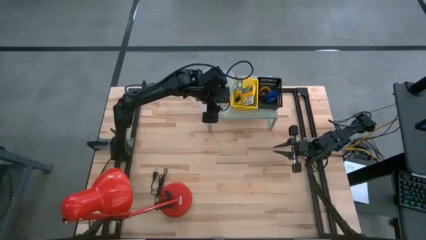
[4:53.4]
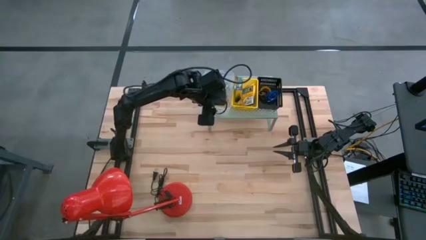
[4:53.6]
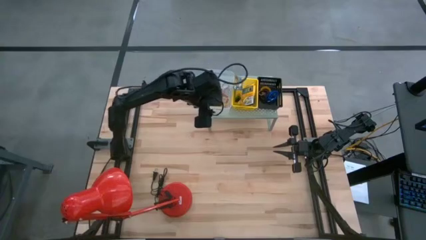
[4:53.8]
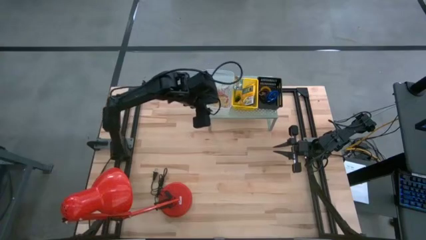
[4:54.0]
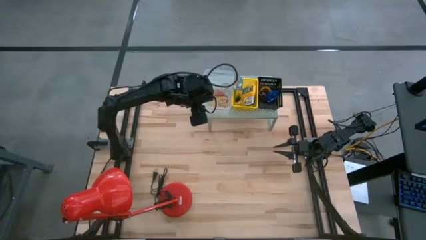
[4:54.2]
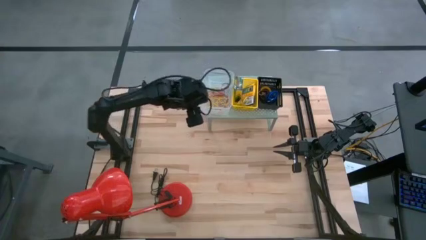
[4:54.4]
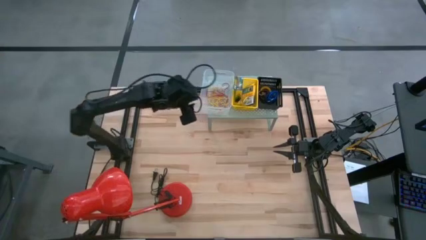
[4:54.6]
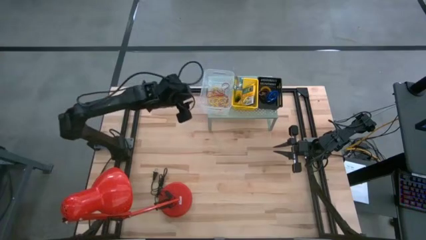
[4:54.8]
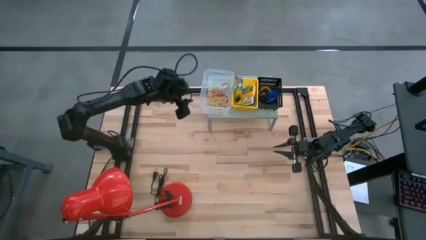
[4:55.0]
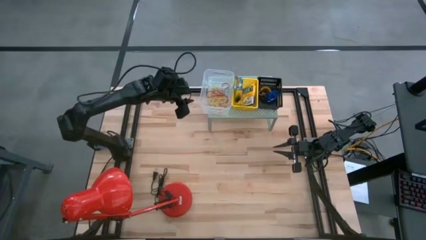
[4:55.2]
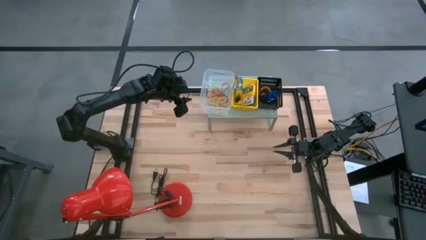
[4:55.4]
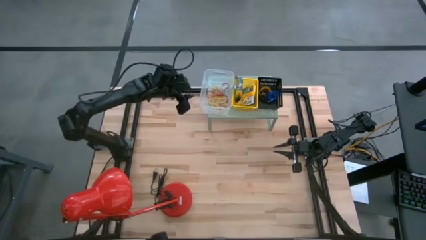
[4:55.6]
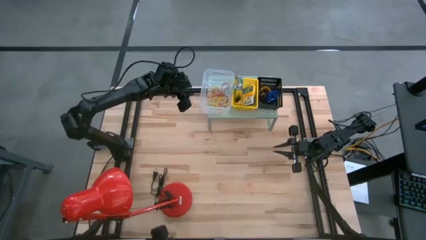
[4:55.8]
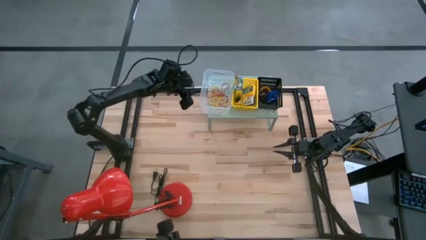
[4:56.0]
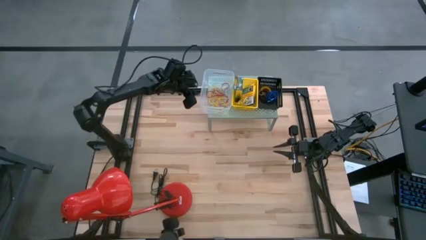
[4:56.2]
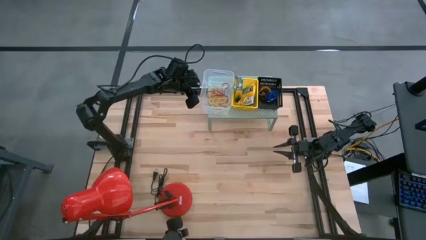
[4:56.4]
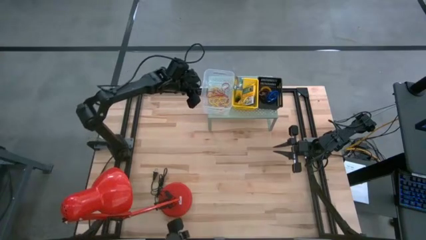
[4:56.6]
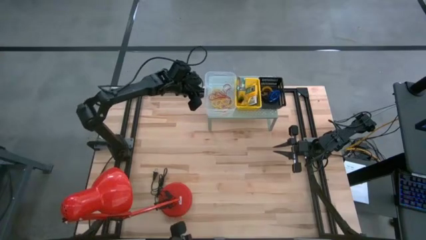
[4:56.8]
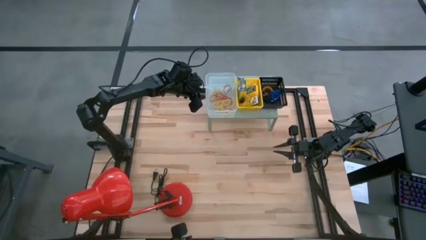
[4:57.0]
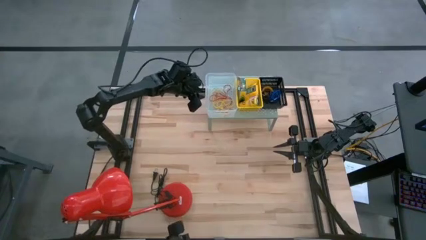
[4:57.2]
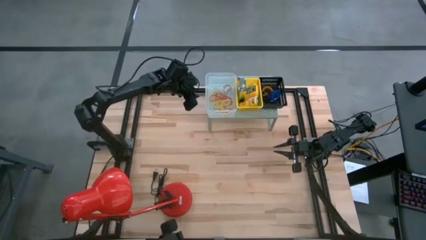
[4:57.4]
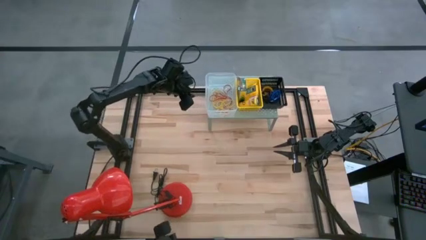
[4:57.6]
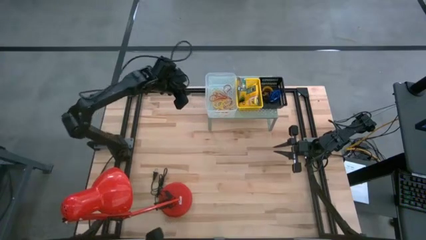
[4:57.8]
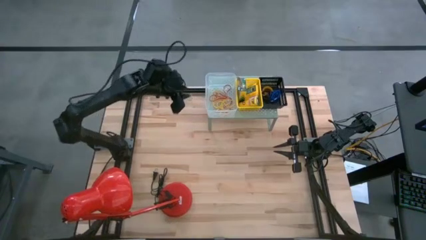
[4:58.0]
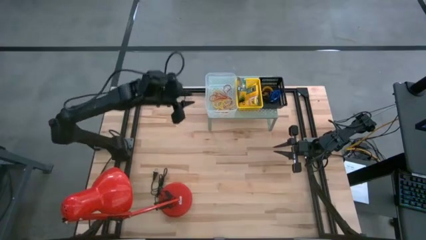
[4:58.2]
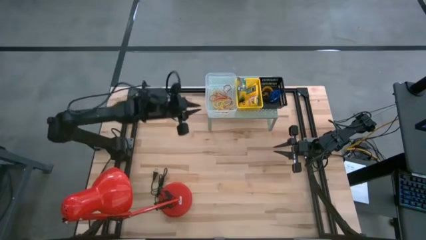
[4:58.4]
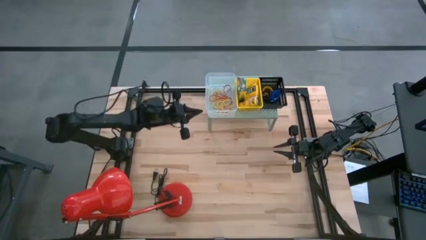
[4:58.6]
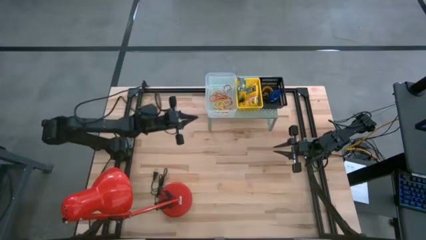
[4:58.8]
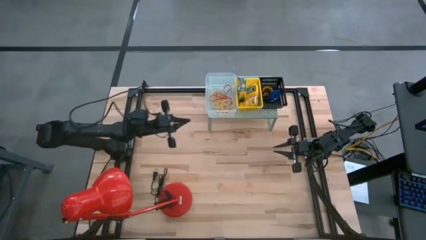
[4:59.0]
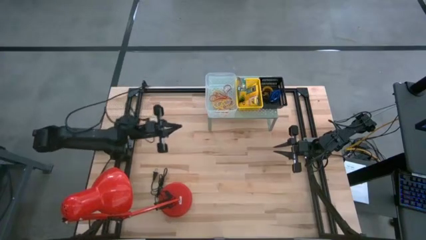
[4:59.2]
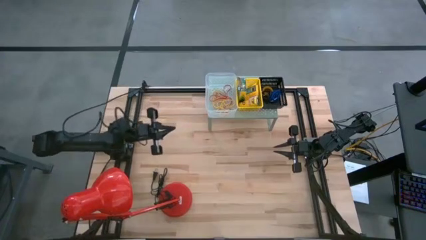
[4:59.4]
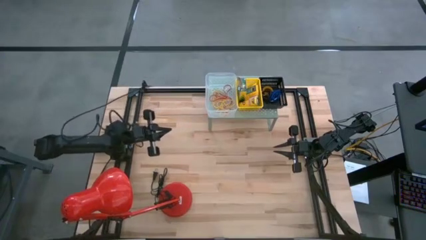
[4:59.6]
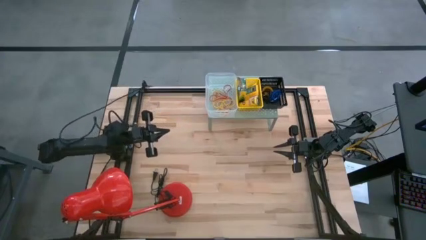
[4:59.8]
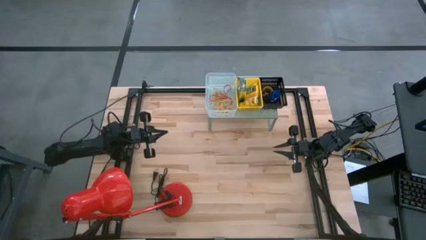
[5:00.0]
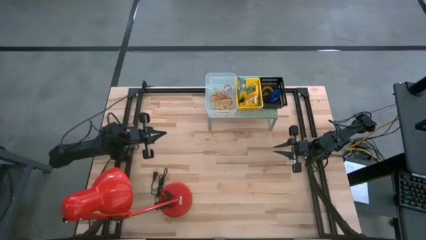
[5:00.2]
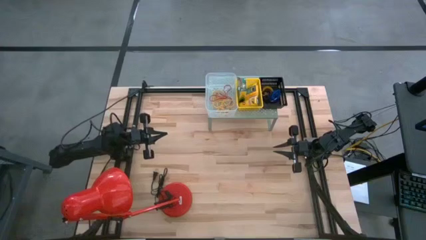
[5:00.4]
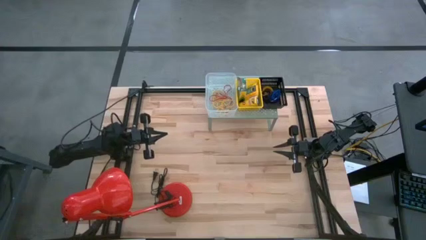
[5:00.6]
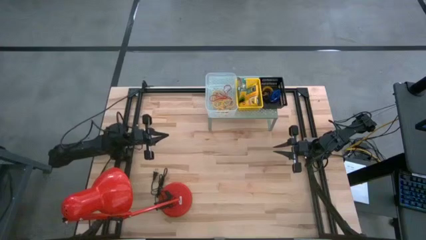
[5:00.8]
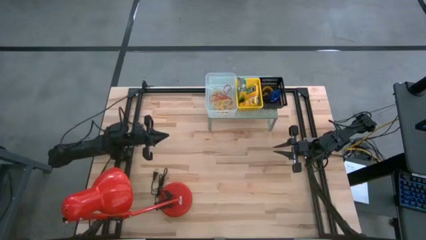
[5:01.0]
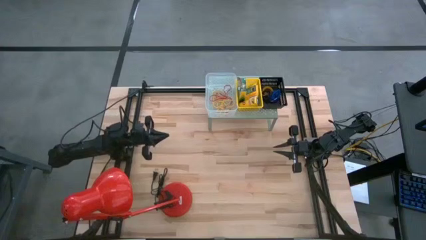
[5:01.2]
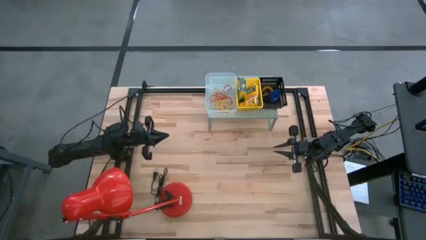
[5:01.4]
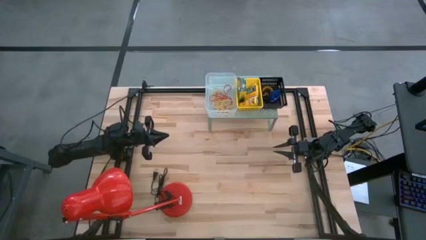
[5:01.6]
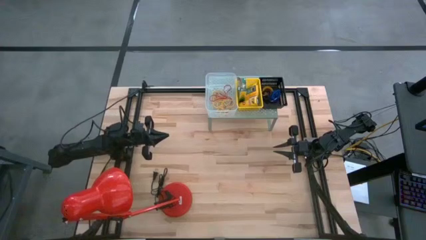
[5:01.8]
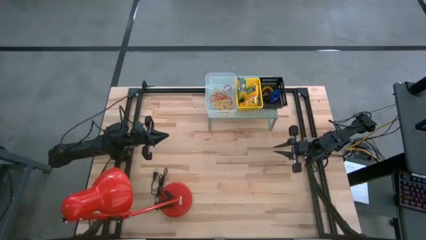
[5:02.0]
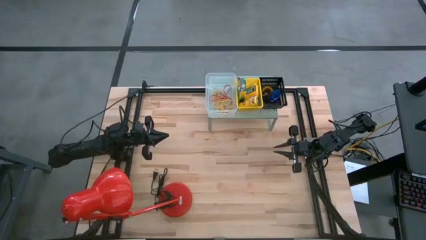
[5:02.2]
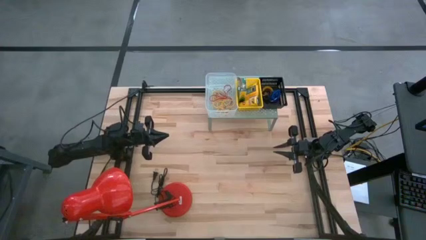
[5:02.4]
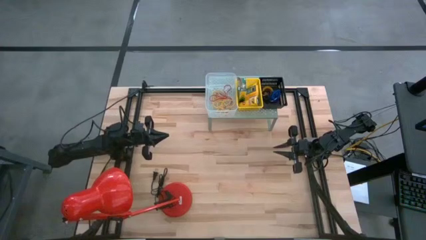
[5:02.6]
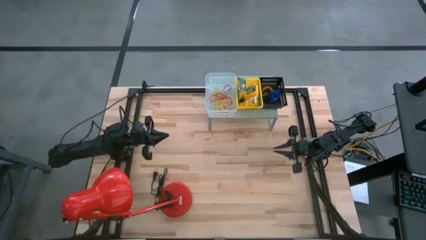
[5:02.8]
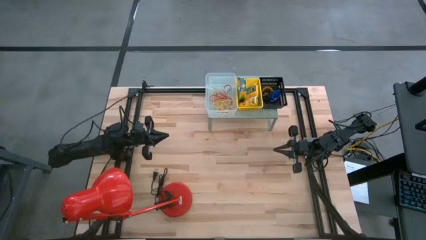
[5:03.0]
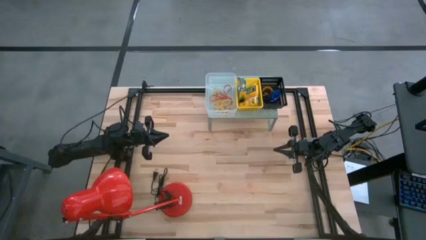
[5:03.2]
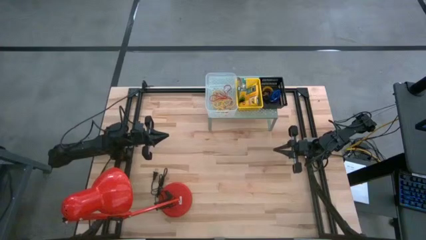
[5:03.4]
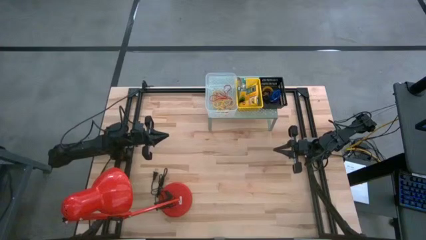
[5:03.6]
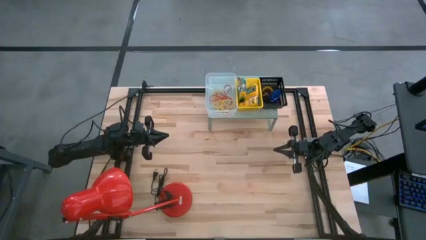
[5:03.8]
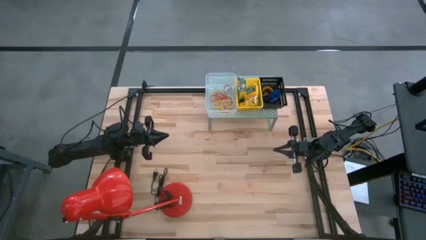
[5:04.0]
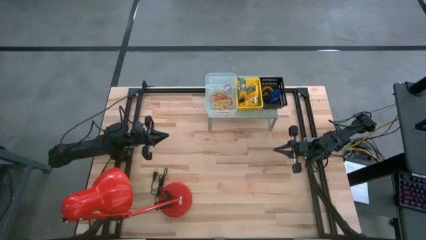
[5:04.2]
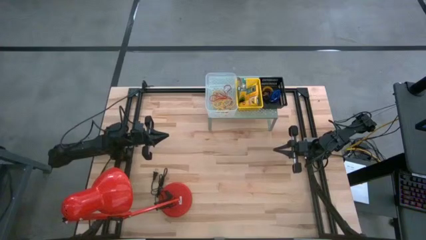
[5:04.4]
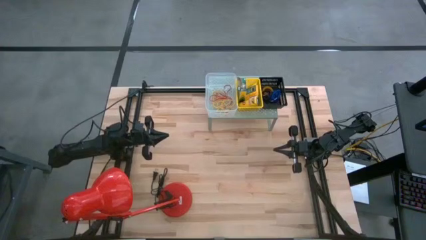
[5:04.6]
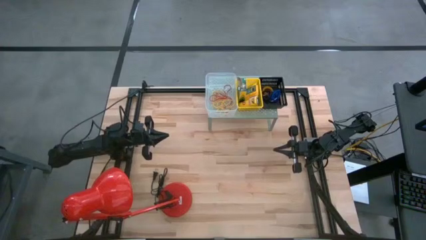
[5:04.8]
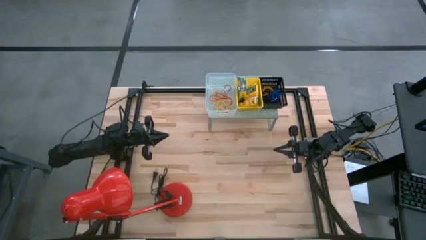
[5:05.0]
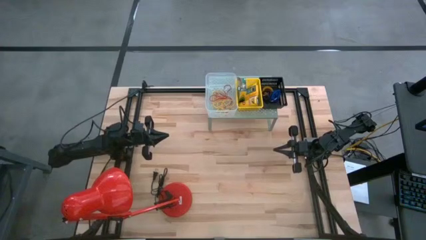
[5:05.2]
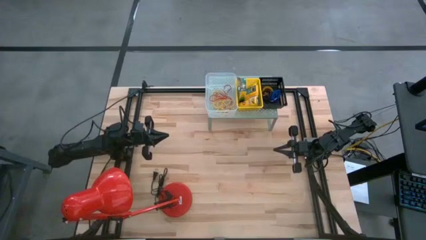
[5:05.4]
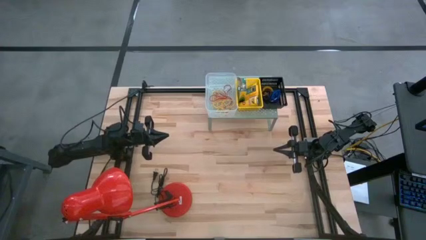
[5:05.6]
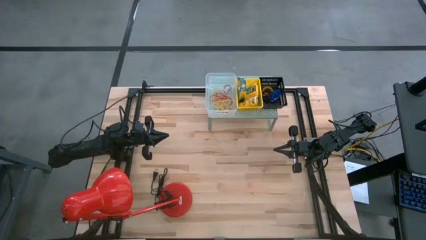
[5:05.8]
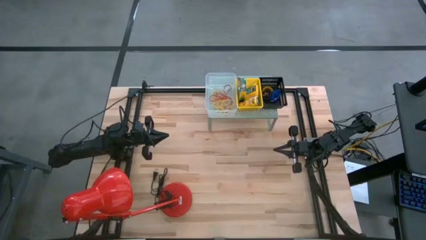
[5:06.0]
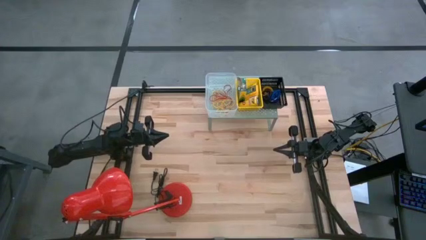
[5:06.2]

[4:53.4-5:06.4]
Task: Pick & Place Office Desk Supplies
Return to Home Position
